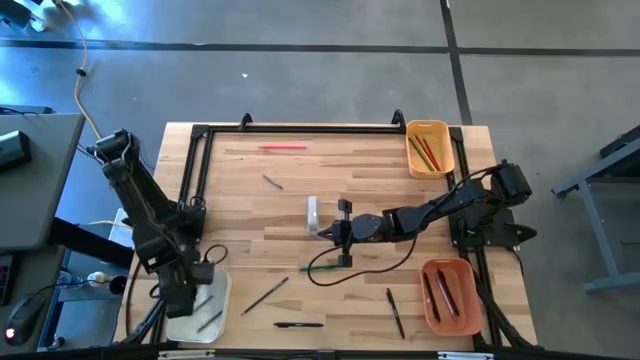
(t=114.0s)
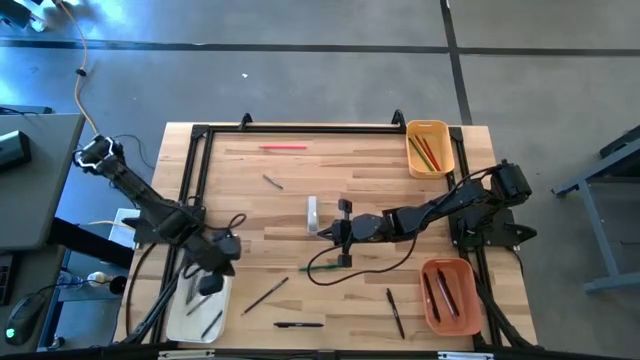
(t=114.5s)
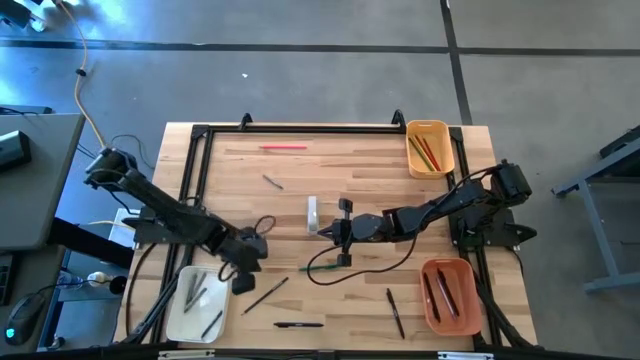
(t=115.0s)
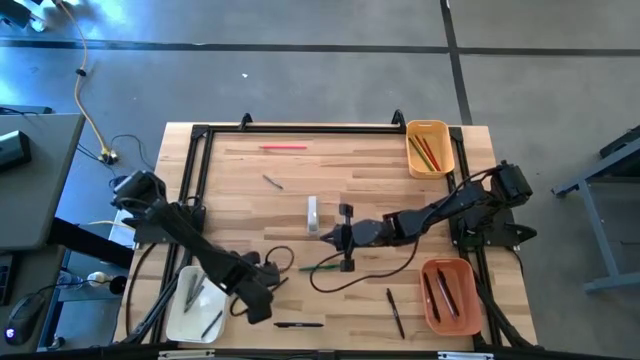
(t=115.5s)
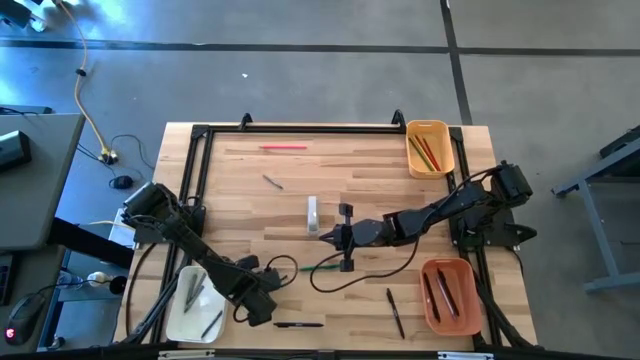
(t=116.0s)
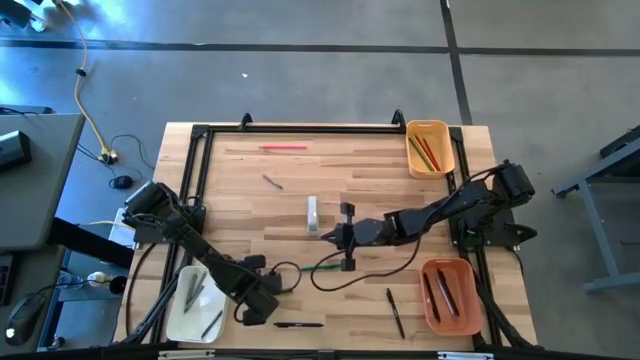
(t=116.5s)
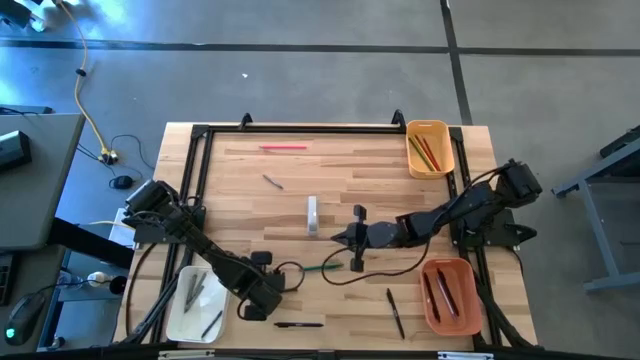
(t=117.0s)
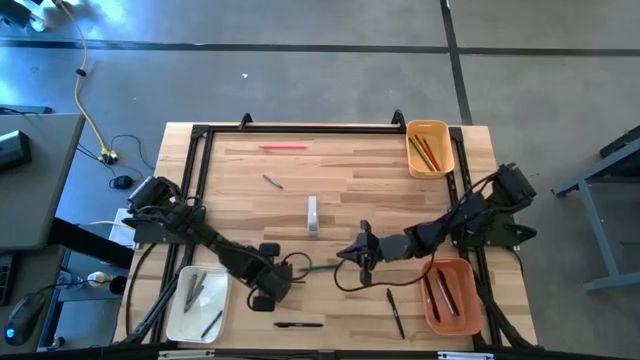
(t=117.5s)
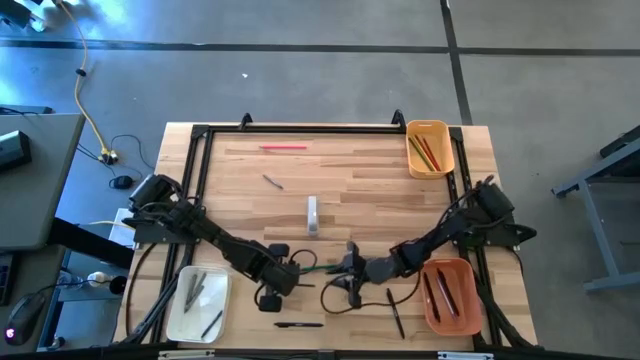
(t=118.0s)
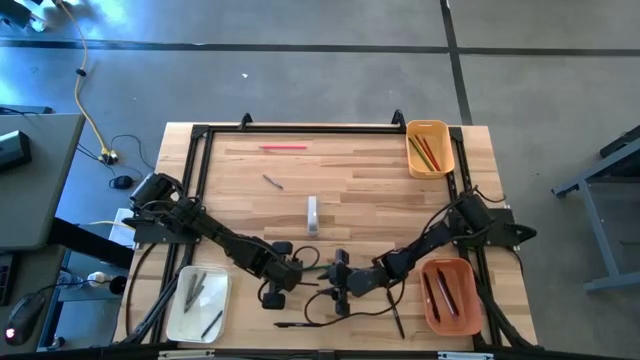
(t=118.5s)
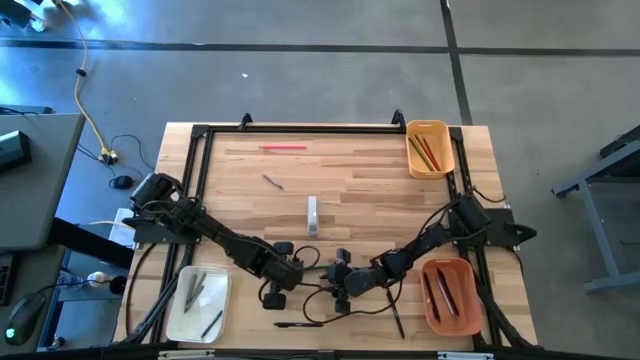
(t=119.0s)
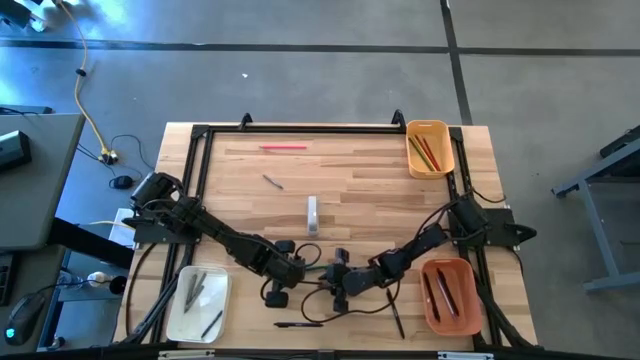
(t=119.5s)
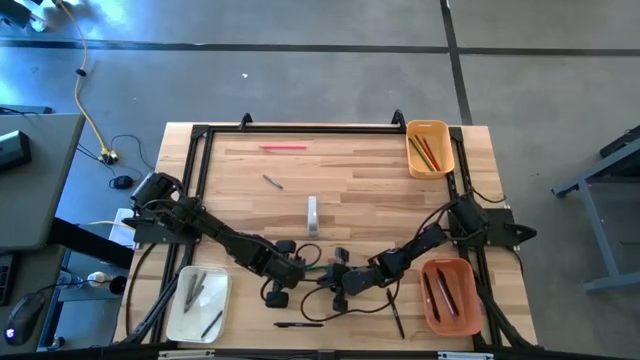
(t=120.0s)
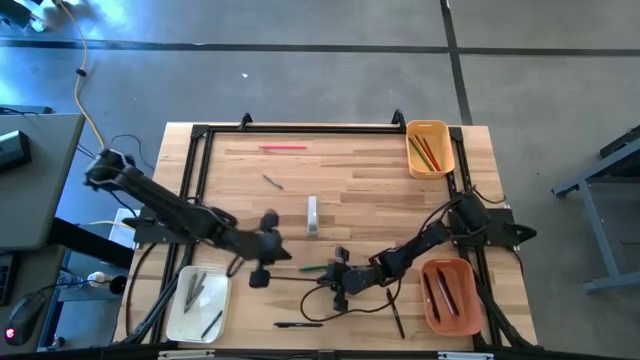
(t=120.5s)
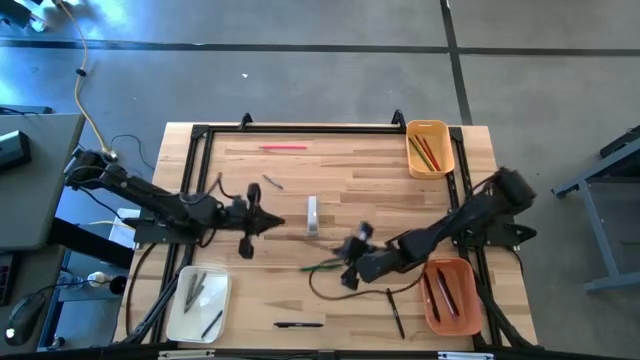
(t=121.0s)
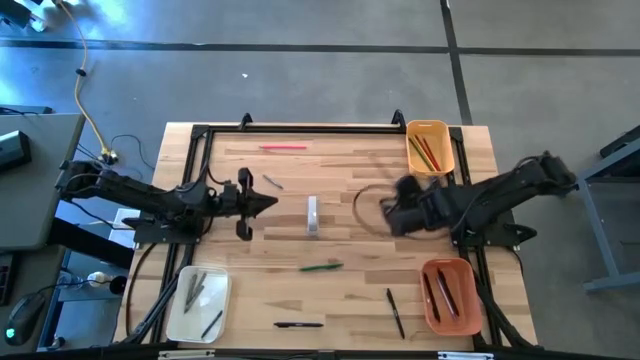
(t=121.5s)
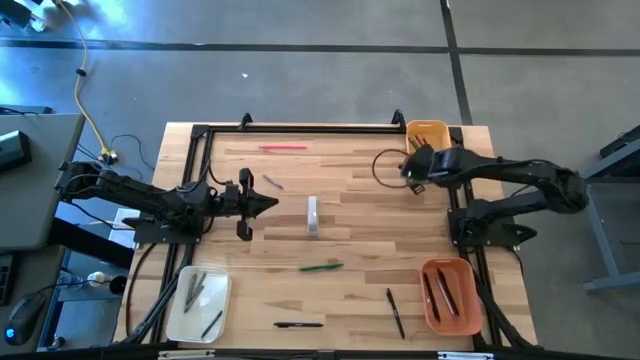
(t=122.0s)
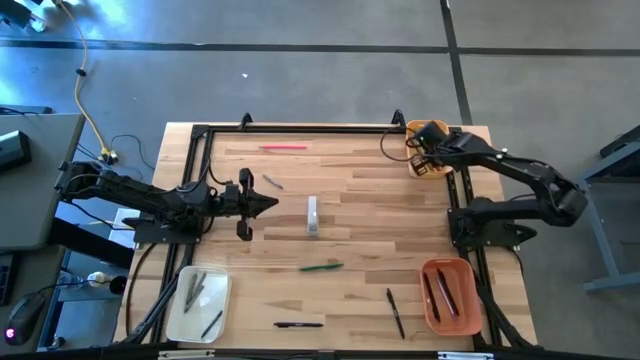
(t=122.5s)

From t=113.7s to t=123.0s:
Task: Sort crayons/erasers/pens/pencils in bins
Put the blue pencil into the yellow bin

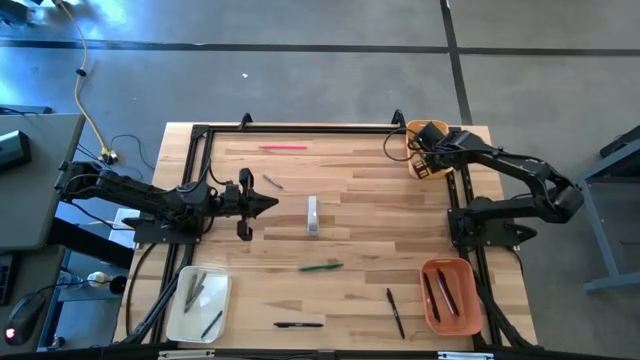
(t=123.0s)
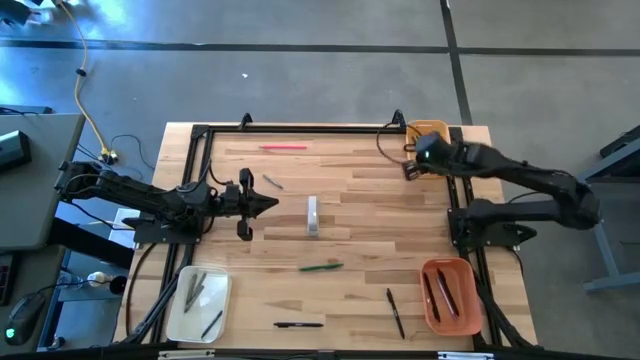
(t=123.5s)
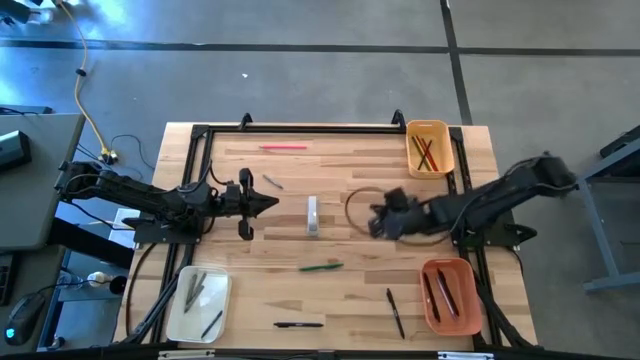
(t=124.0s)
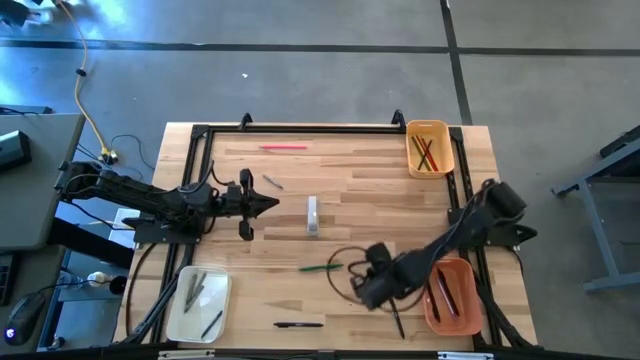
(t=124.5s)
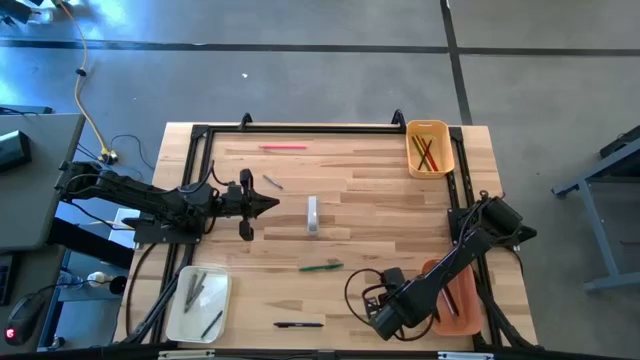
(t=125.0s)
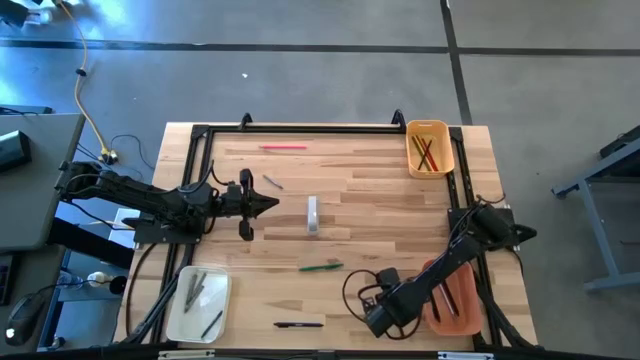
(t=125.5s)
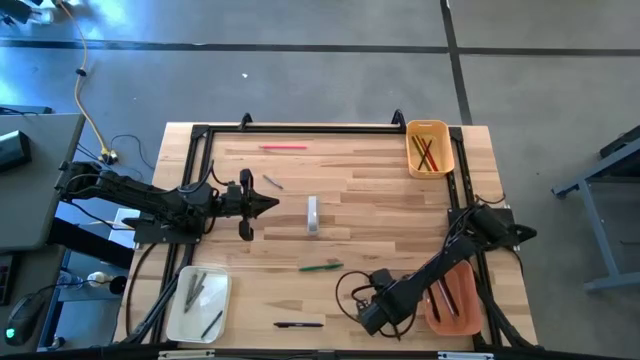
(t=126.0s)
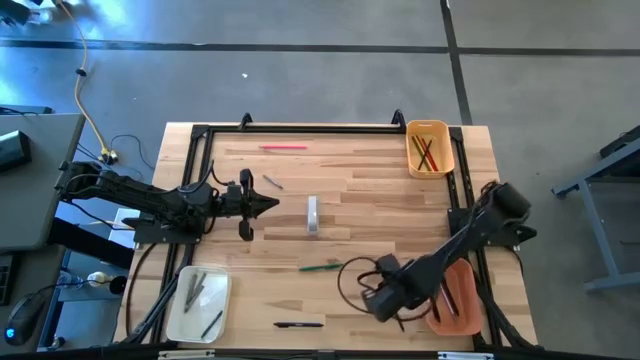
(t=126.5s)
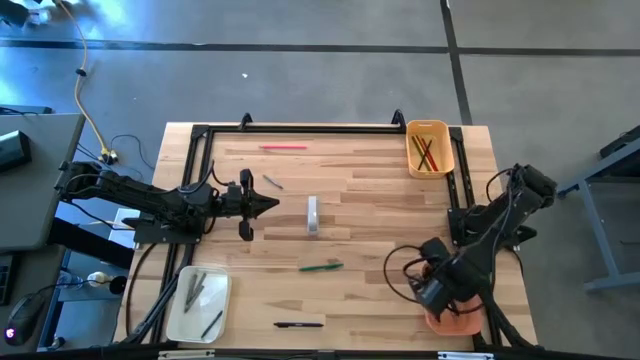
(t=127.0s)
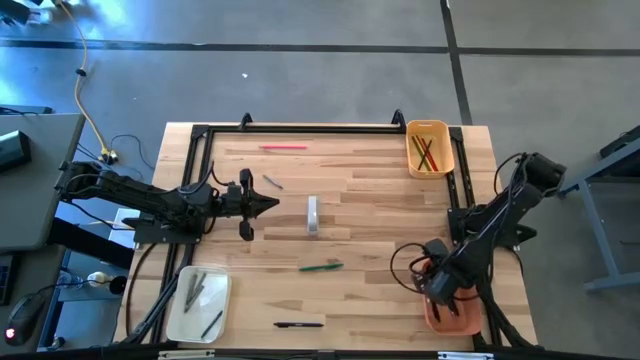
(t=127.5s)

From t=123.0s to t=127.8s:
Put the black pen into the orange bin

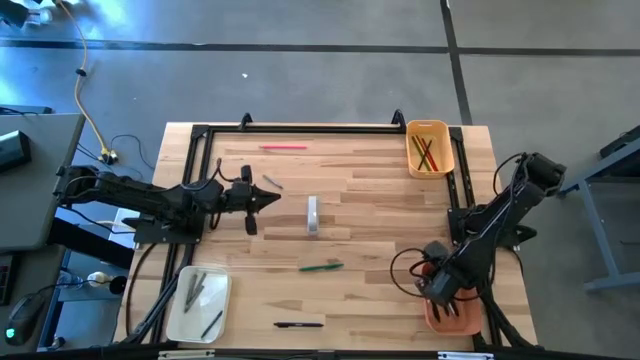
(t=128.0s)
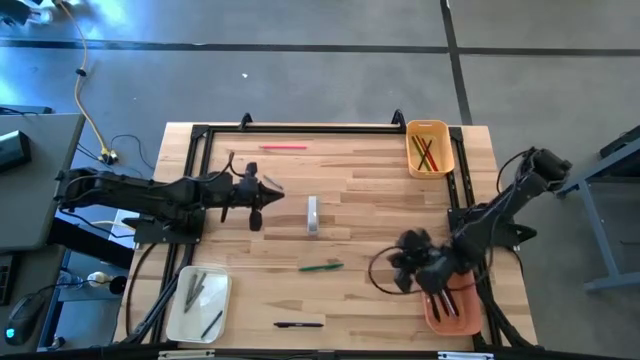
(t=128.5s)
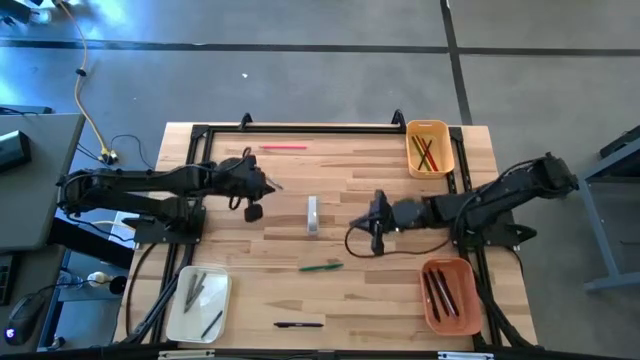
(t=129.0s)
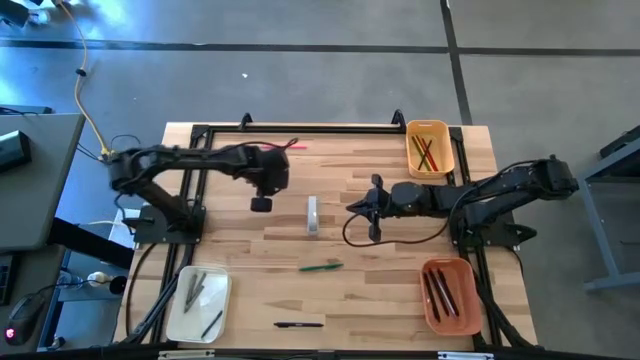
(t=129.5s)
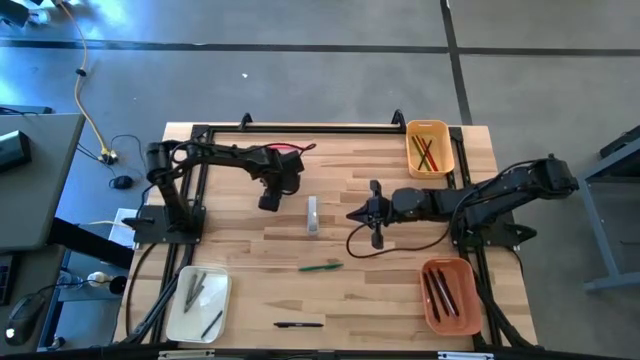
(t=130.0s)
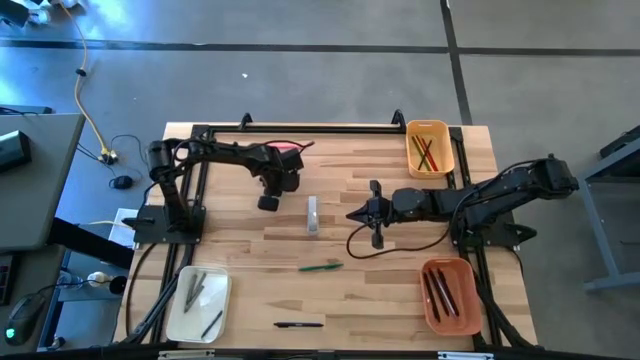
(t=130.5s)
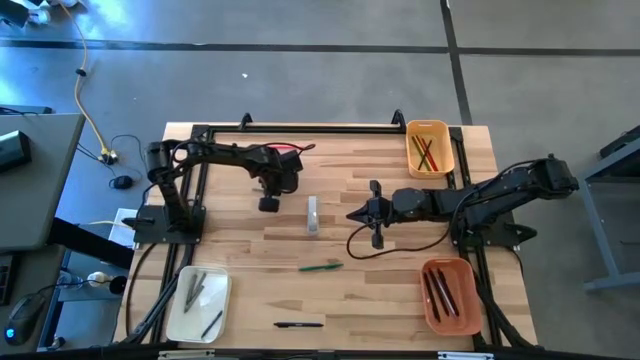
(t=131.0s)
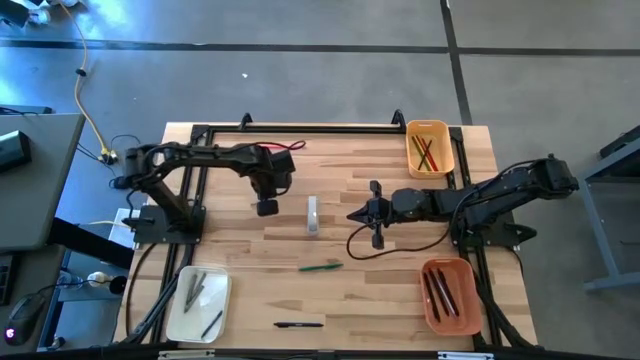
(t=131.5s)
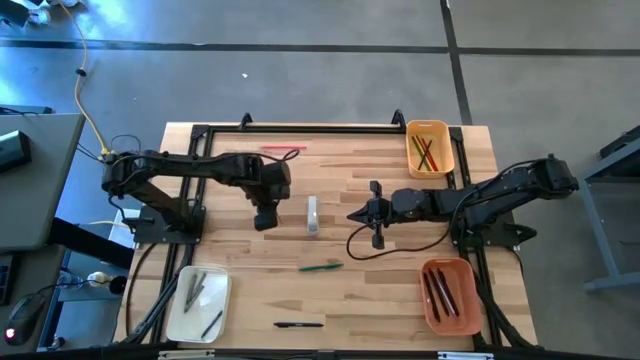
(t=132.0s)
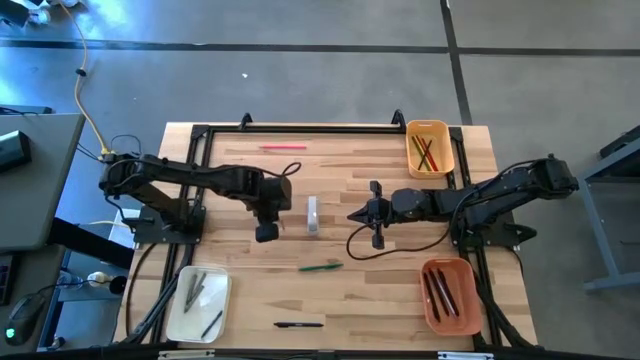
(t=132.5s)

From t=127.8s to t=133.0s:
Put the gray crayon into the white bin

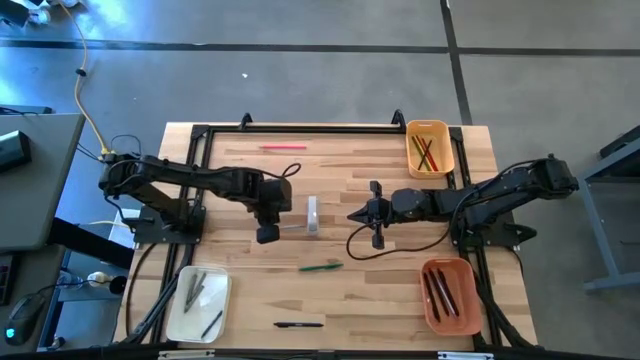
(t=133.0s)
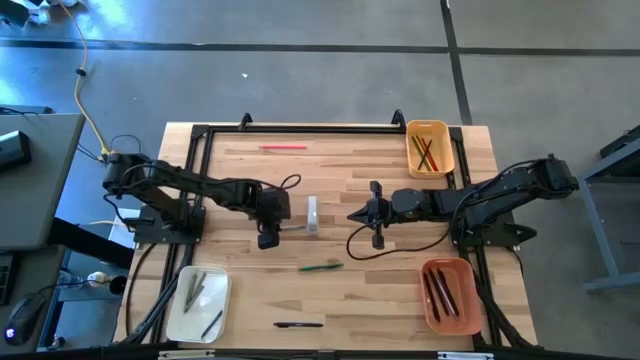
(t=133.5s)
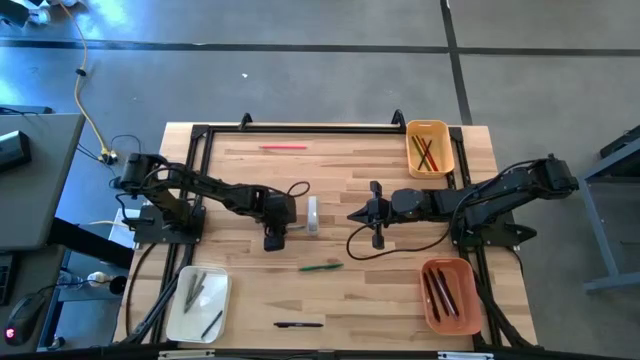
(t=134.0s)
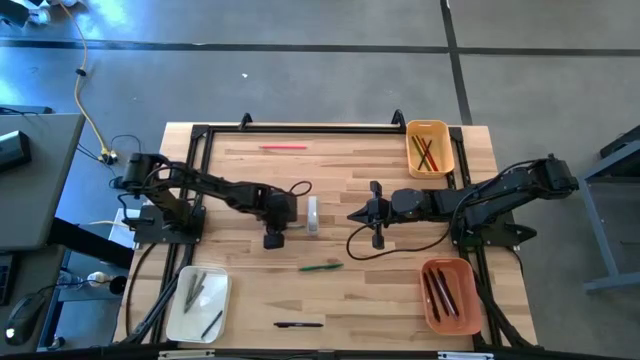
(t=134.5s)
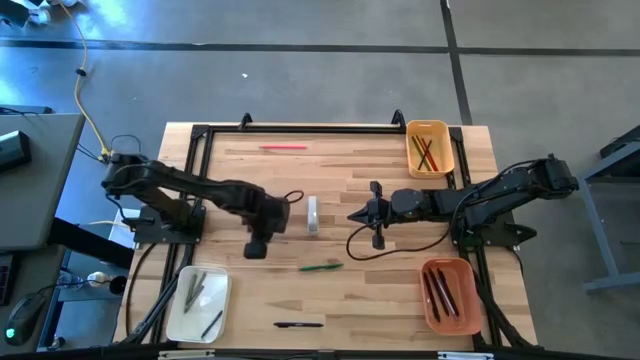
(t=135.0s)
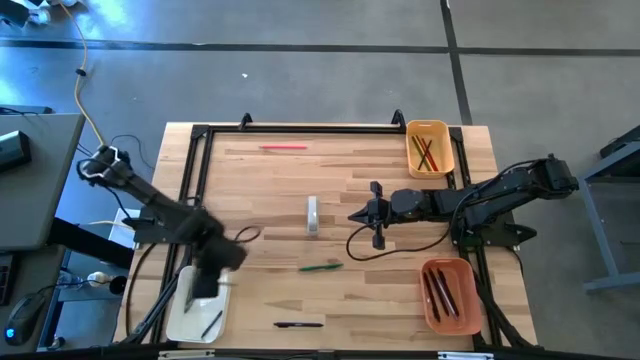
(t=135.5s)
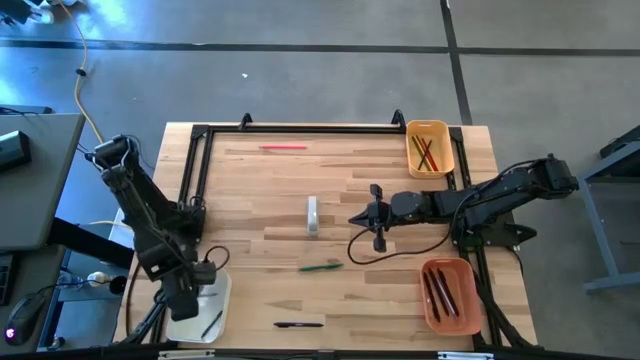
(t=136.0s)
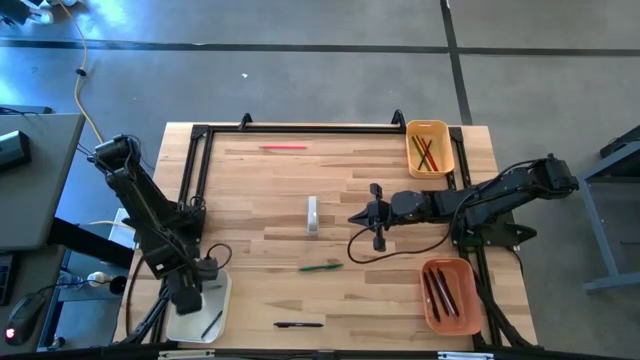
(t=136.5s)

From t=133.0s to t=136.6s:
Put the gray crayon into the white bin
